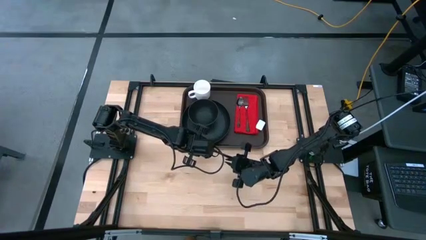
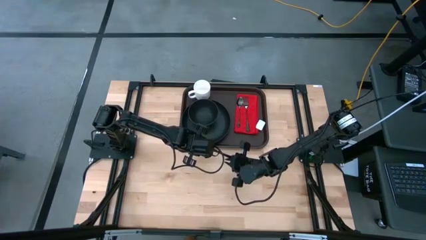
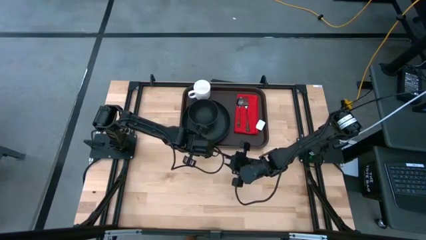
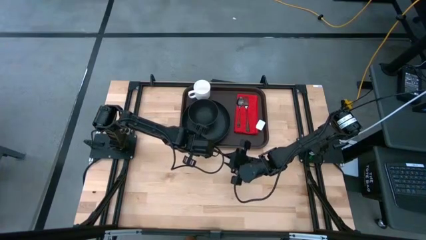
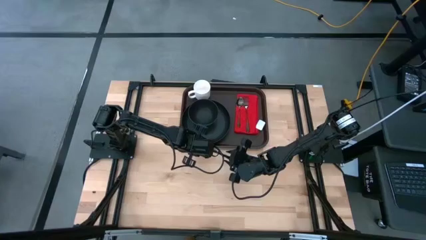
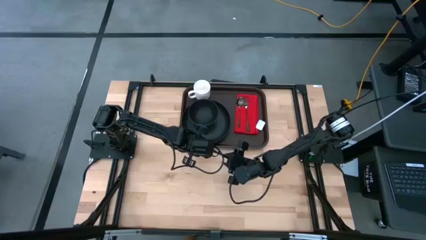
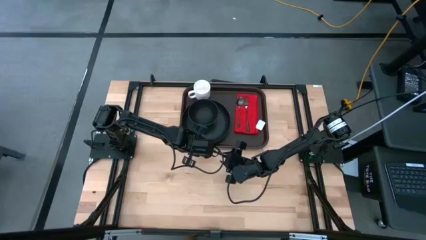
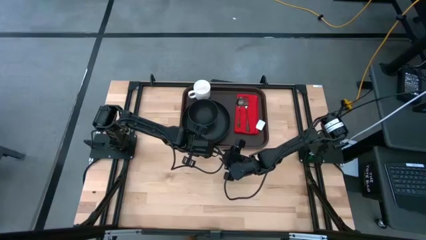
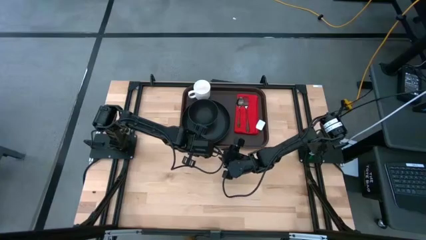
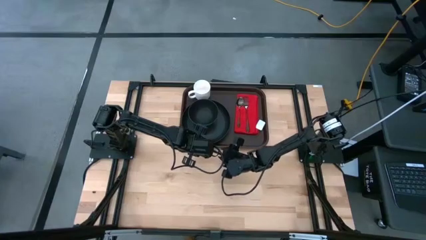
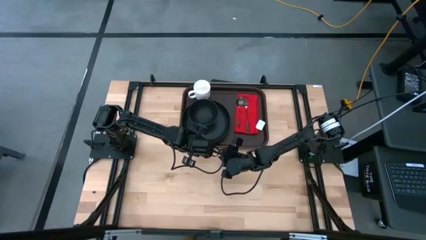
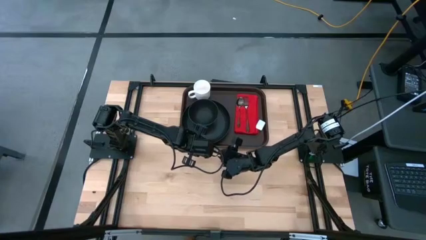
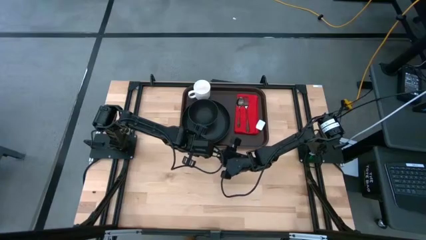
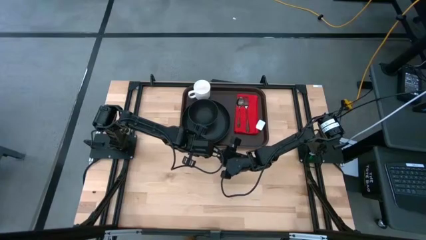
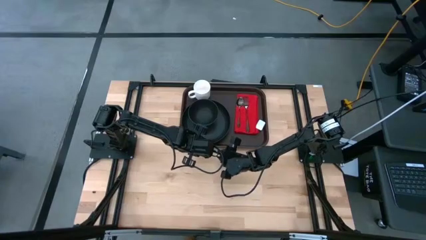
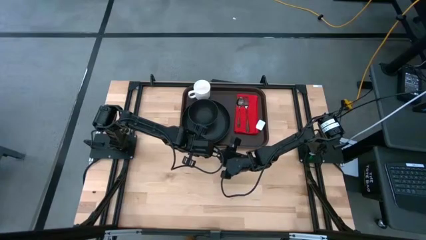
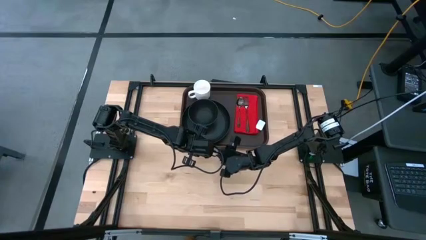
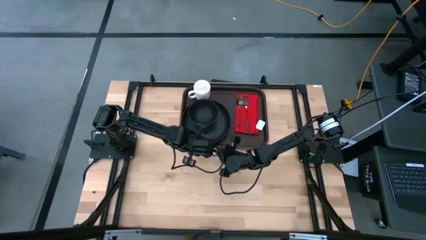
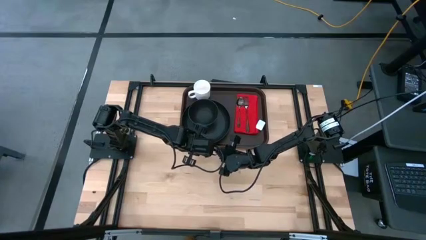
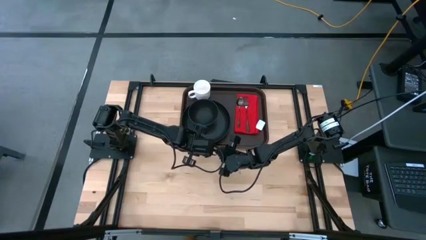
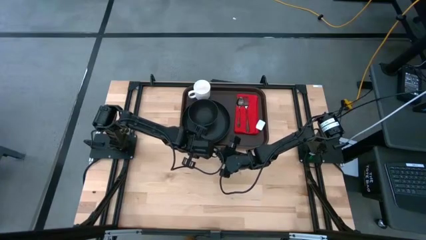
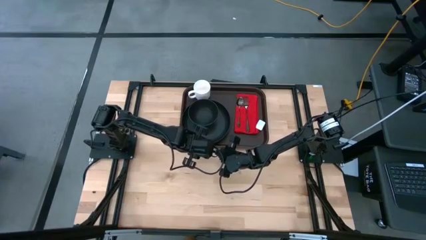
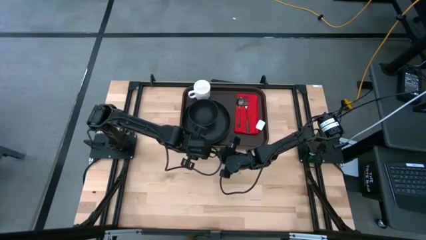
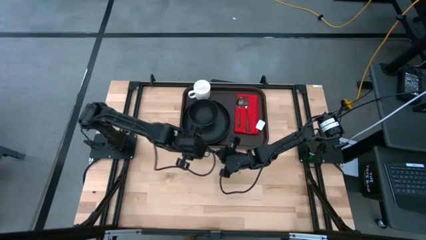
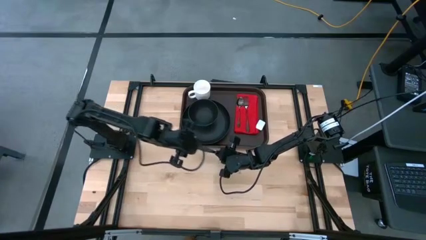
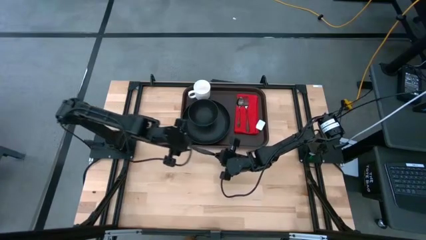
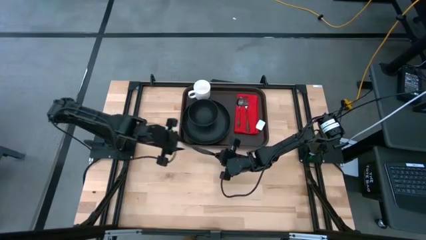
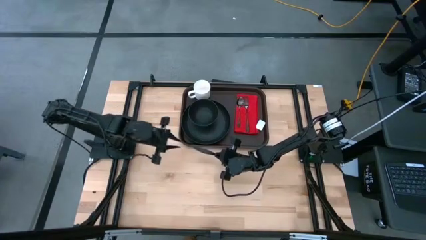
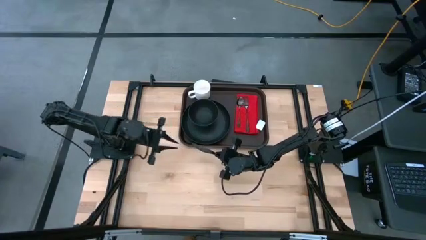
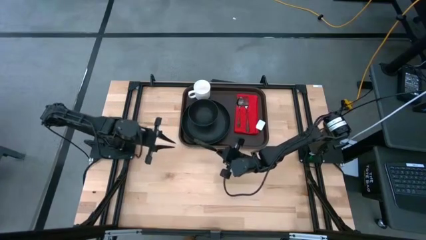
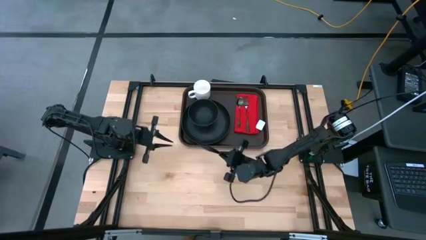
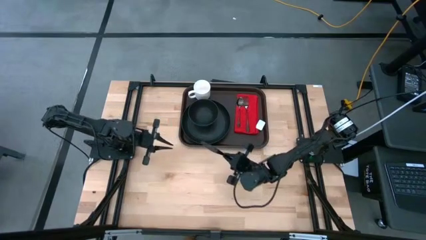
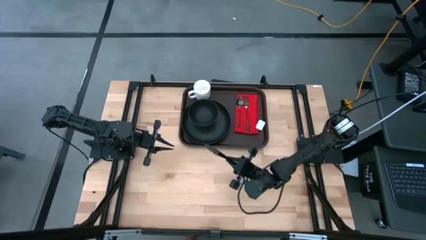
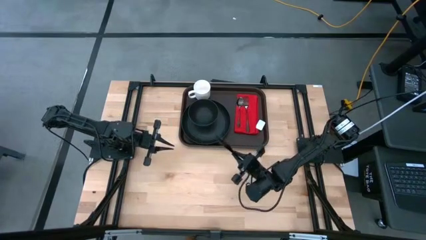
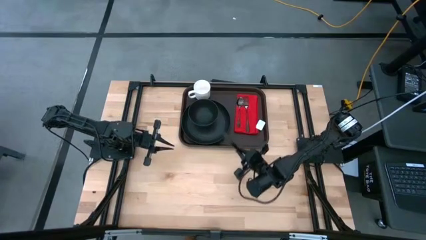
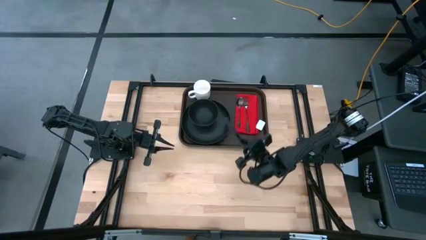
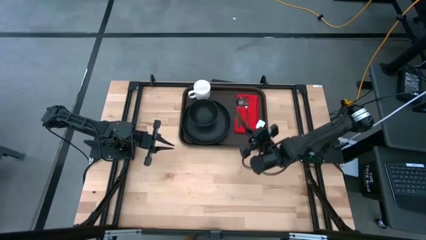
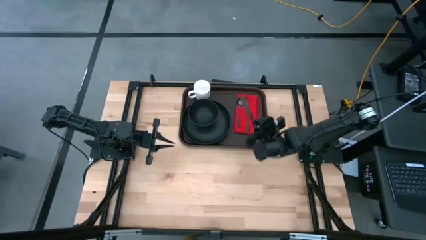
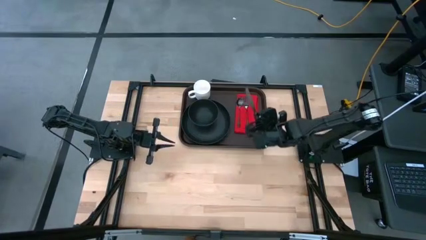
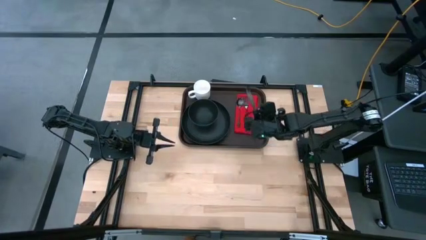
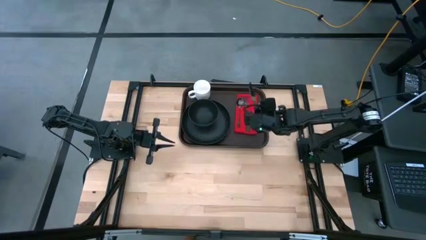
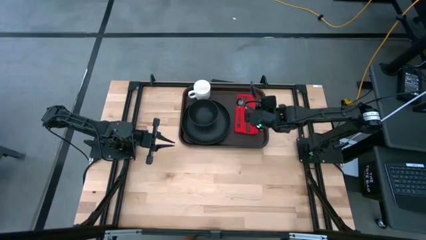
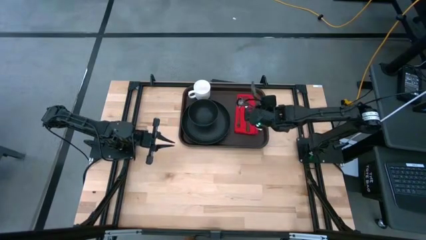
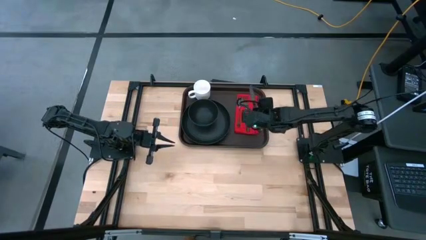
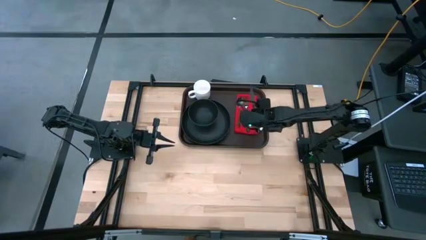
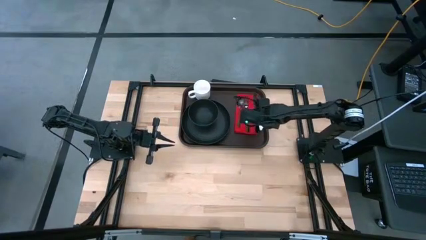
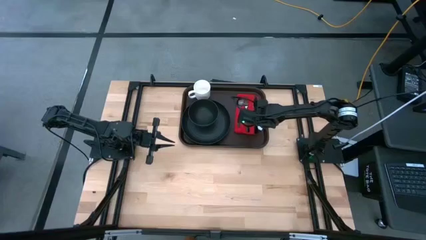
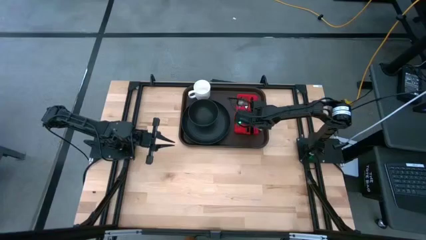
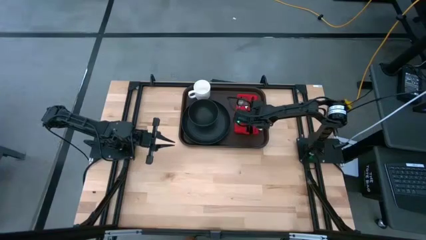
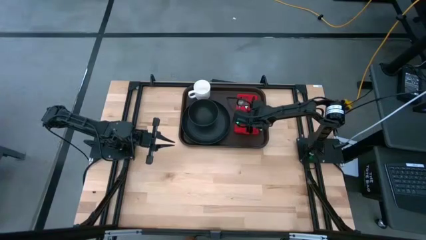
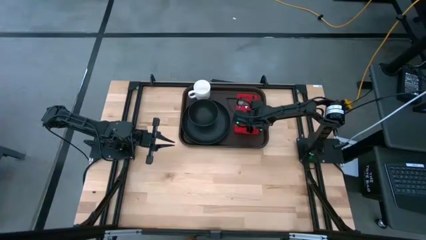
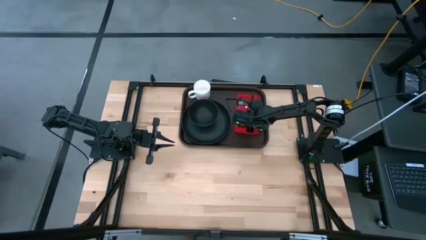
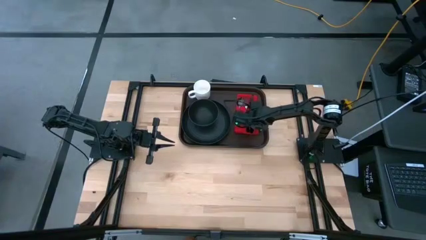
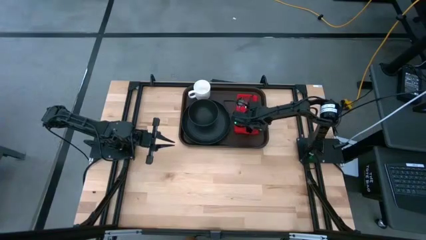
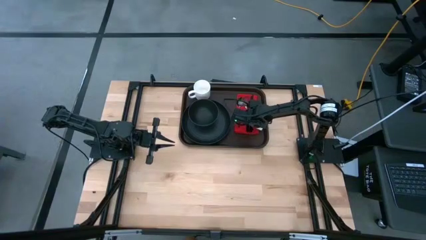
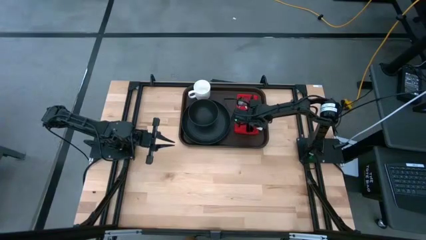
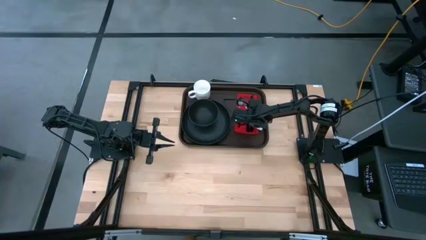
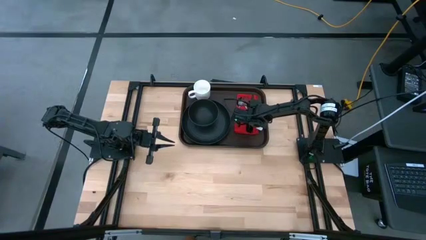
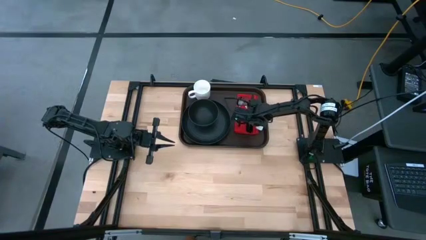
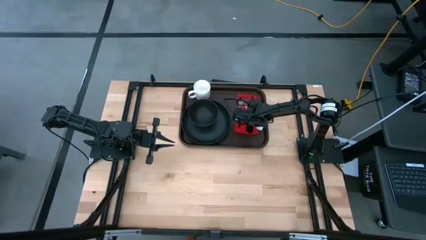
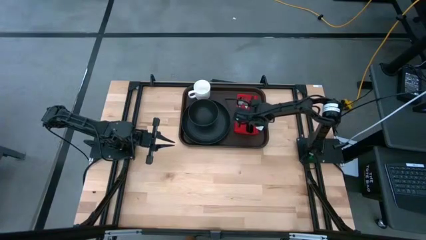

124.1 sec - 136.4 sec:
Task: Set up tray
Put the black dinner knife on top of the red napkin on the right side of the fork
